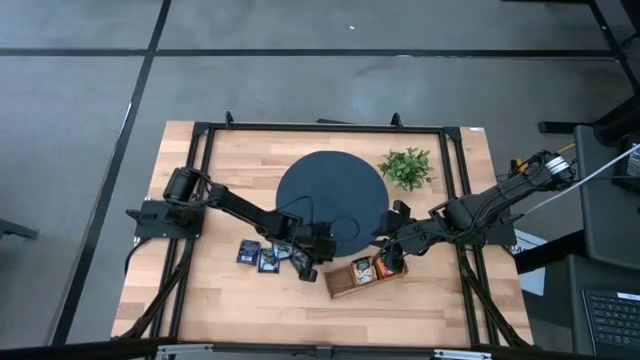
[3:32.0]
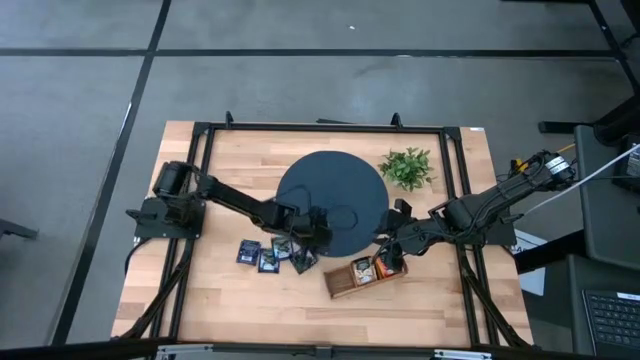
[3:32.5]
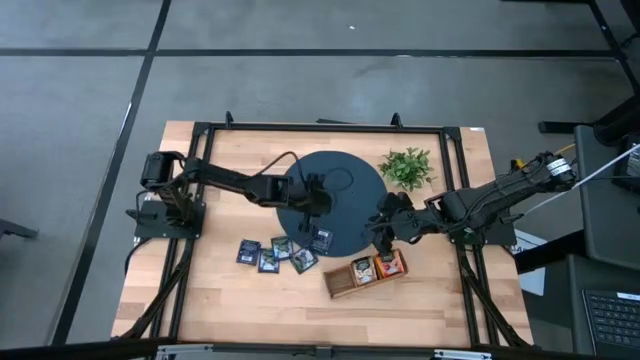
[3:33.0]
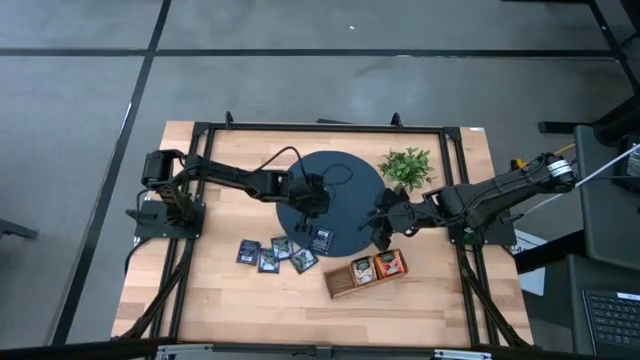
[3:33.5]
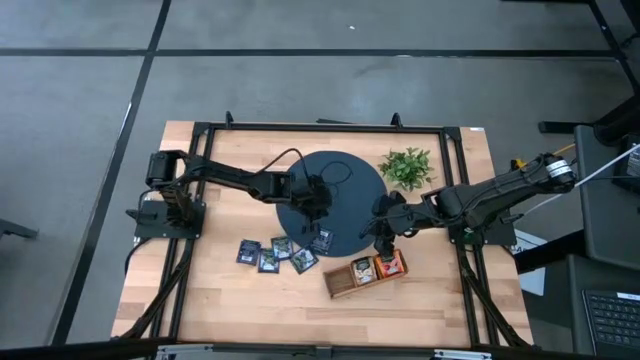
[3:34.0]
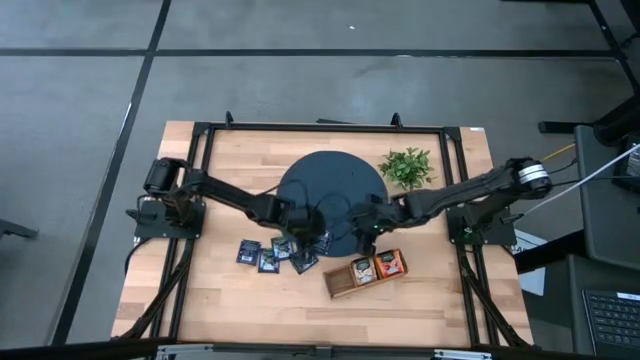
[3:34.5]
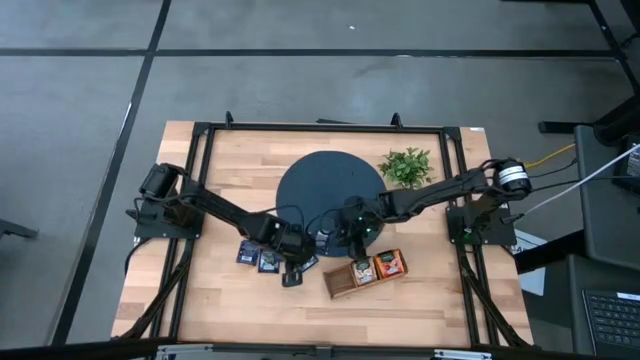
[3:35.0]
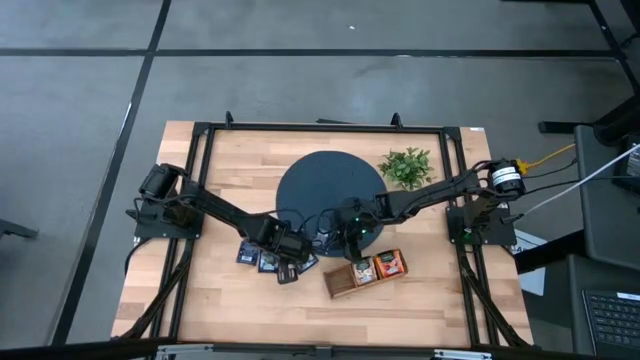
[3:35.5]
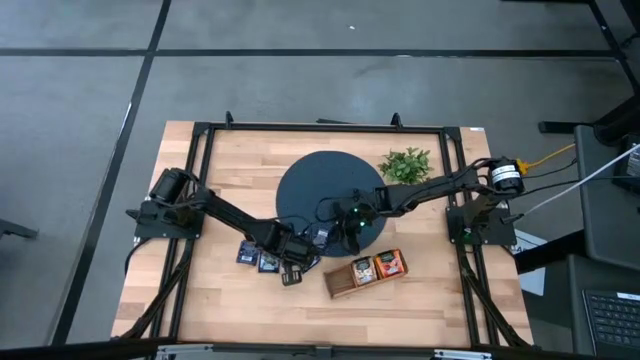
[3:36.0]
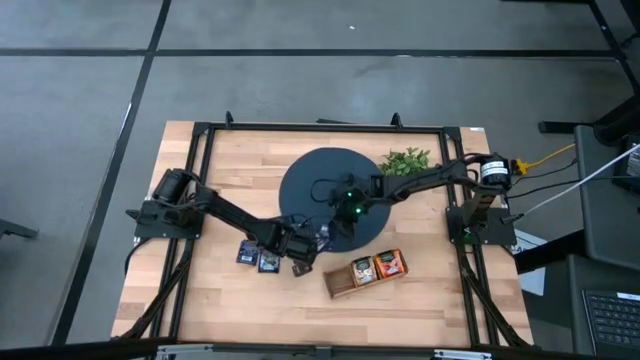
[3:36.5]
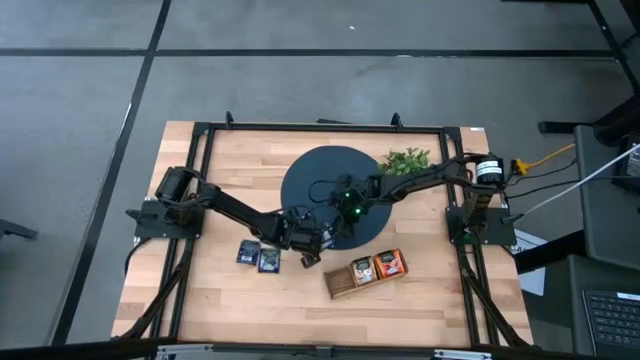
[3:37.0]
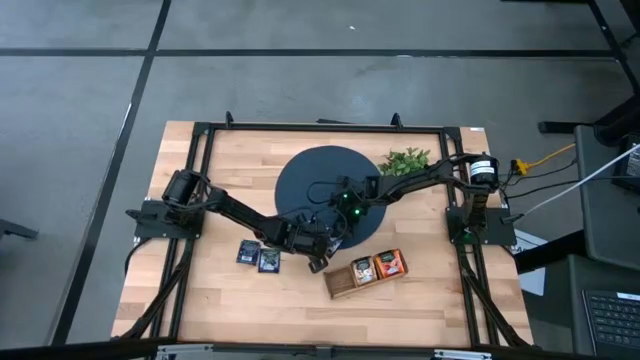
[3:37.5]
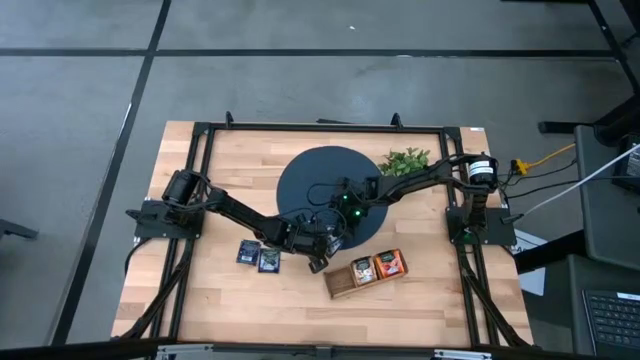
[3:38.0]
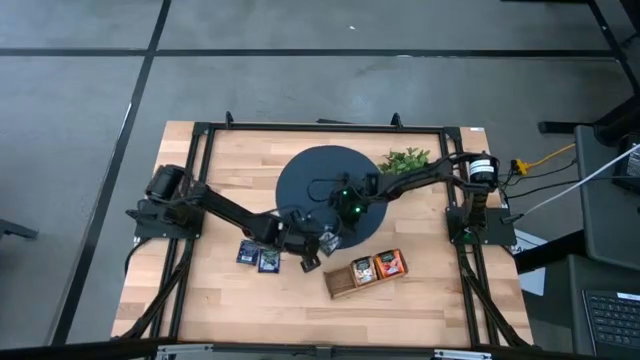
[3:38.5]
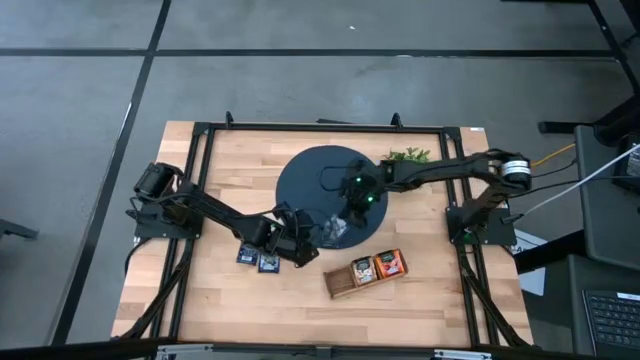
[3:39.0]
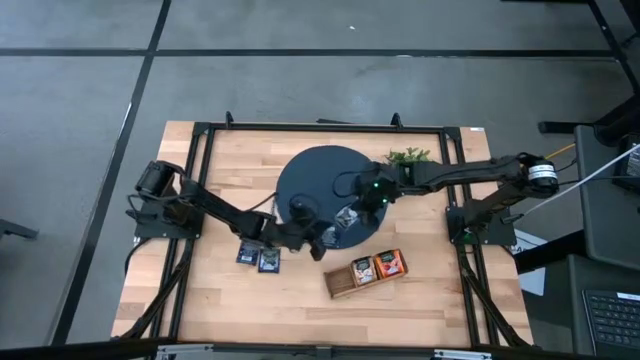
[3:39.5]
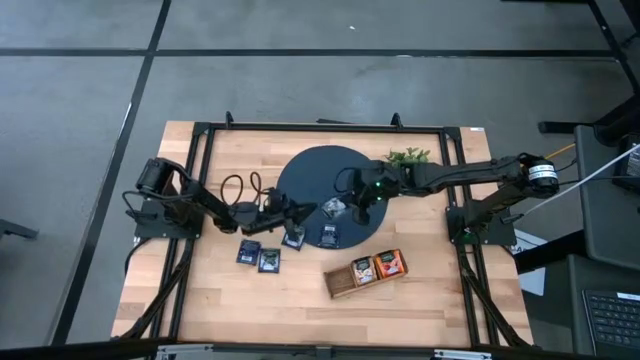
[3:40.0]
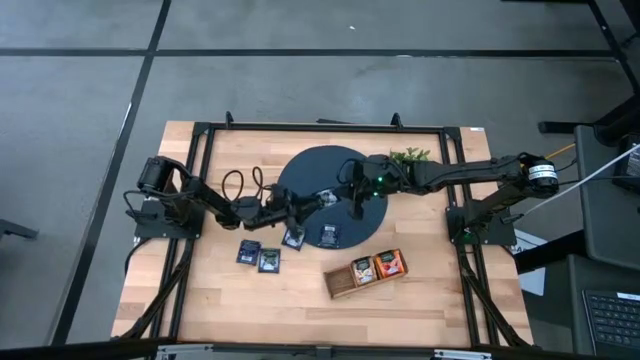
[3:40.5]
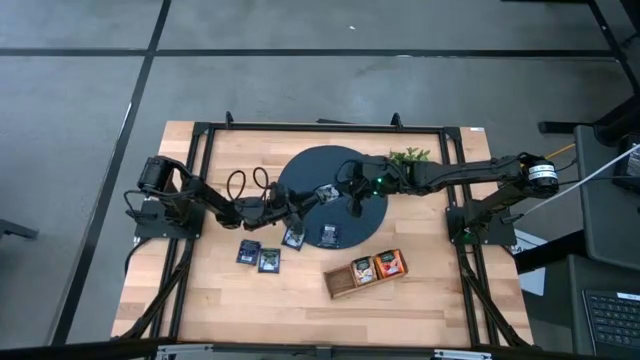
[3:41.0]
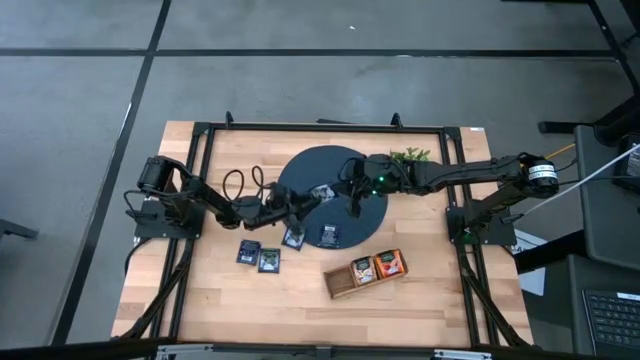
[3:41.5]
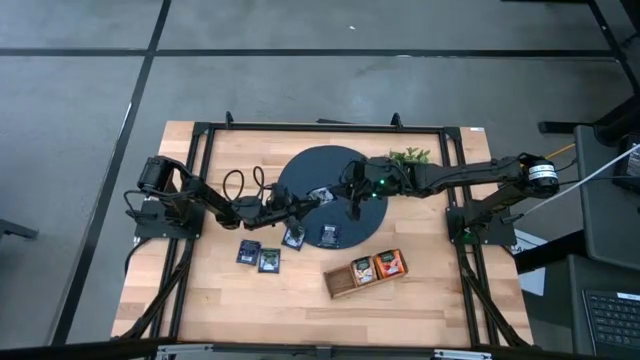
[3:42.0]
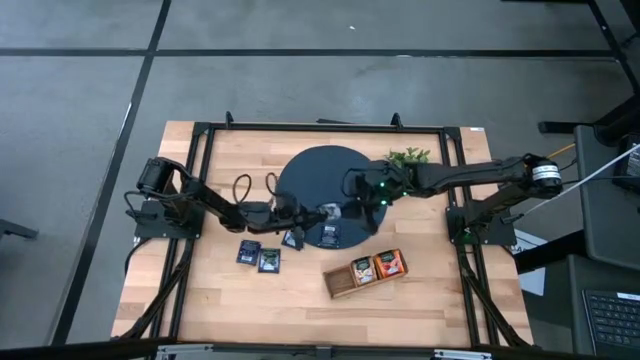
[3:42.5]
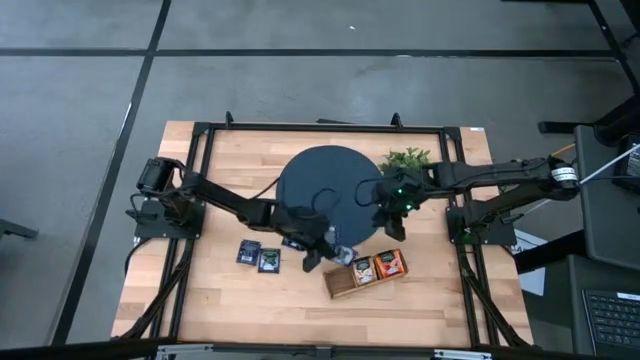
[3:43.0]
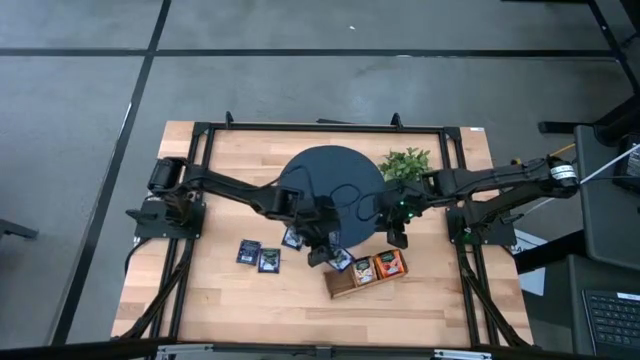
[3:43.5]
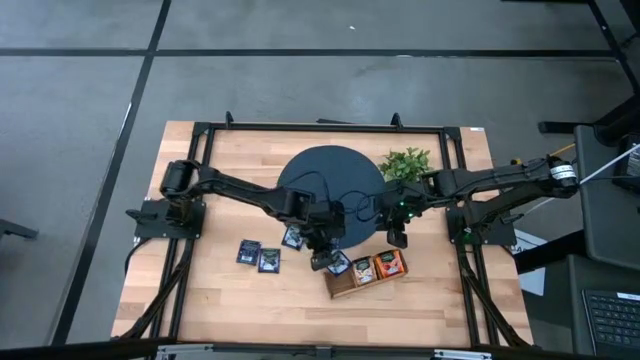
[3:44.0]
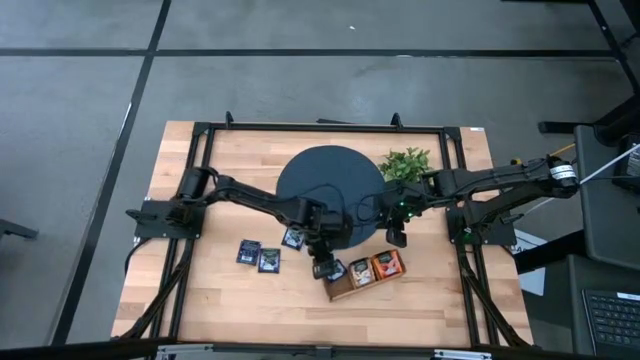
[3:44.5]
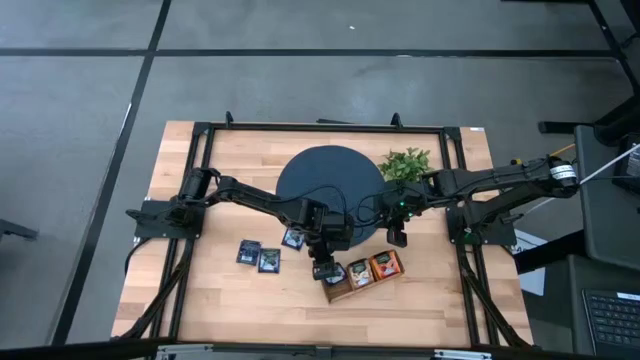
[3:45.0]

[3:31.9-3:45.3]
Task: Pick & Place Tea
Put the purple tea bag into the left section of the wooden organizer

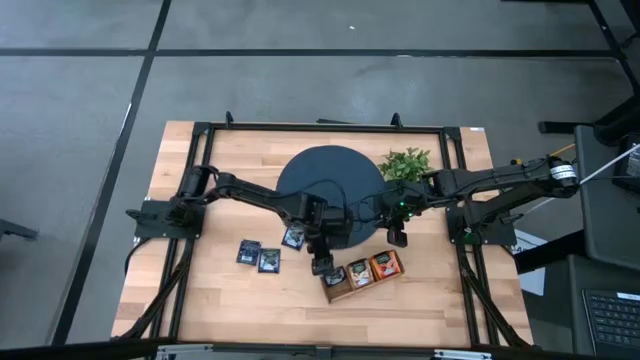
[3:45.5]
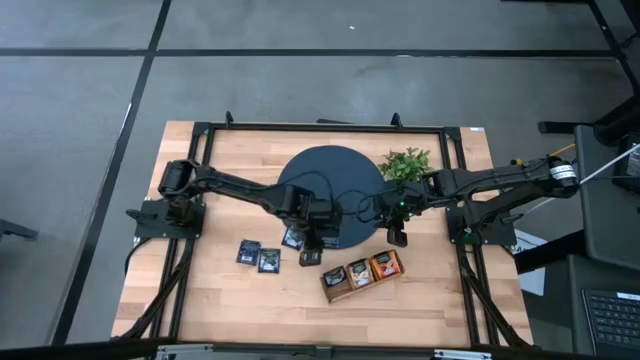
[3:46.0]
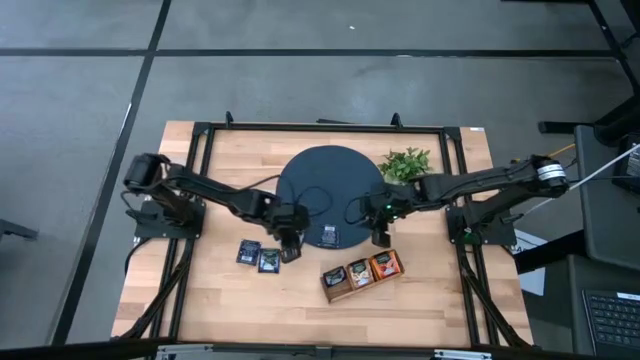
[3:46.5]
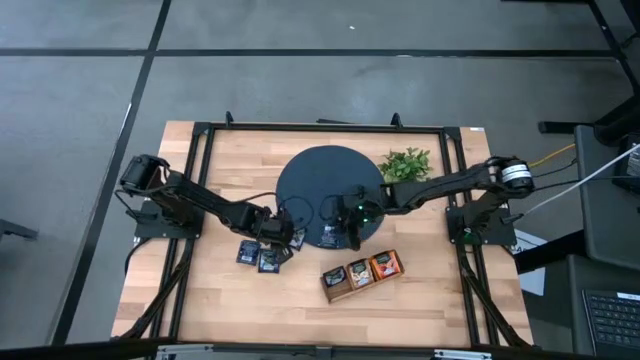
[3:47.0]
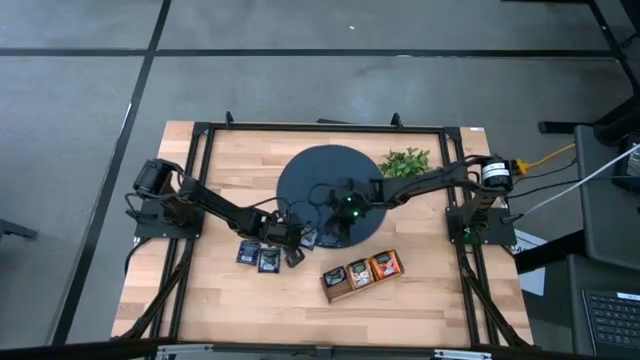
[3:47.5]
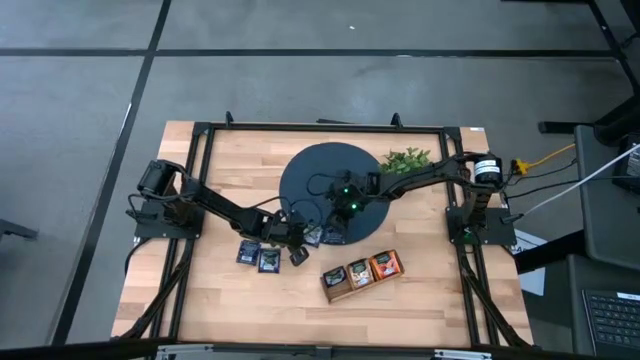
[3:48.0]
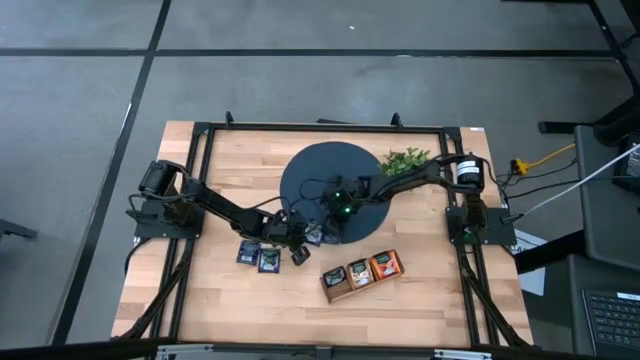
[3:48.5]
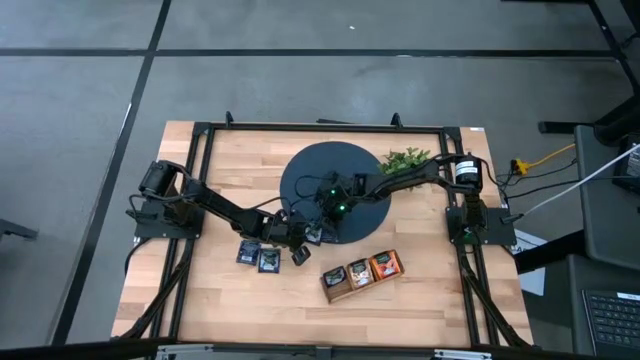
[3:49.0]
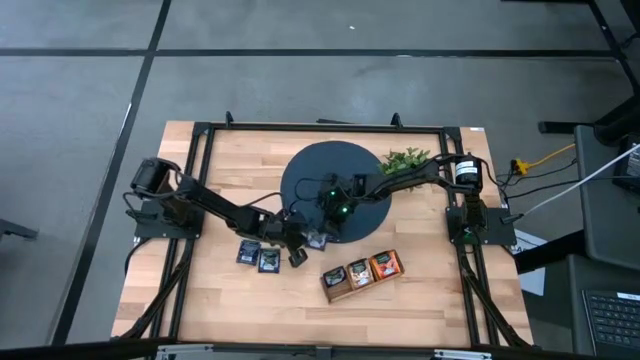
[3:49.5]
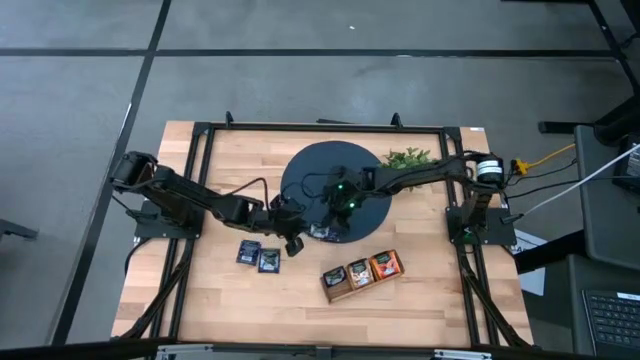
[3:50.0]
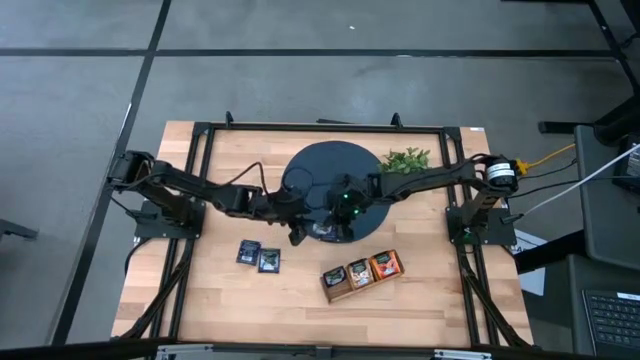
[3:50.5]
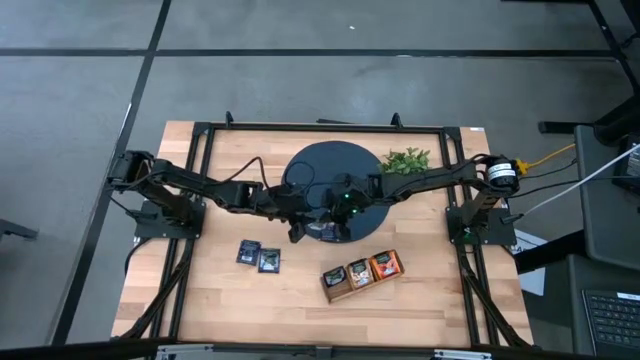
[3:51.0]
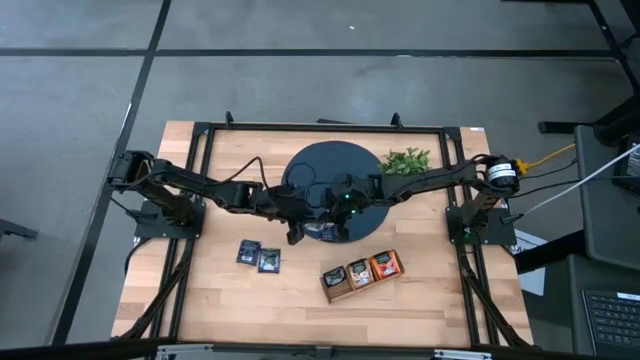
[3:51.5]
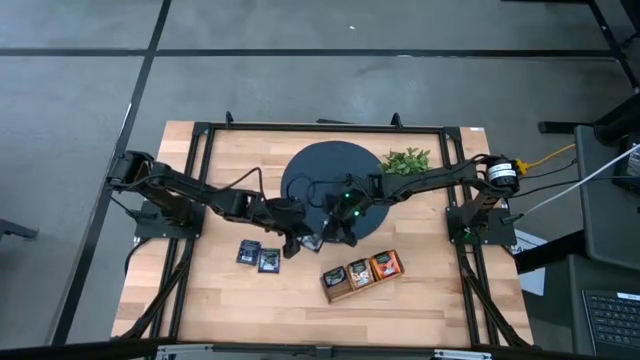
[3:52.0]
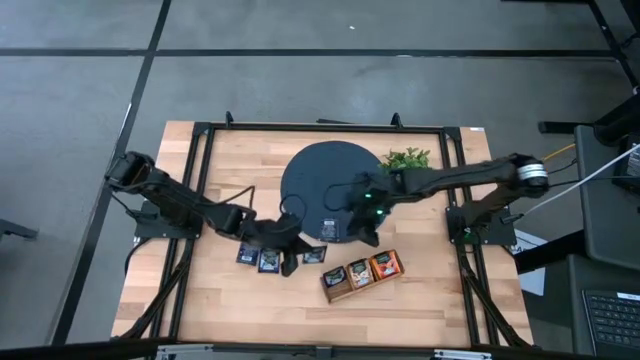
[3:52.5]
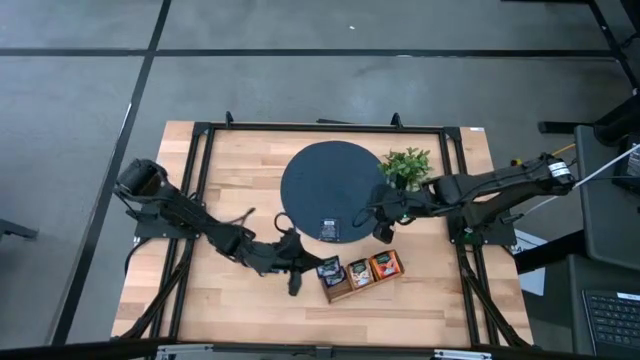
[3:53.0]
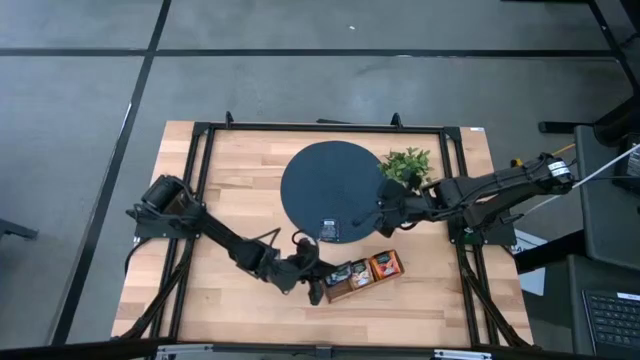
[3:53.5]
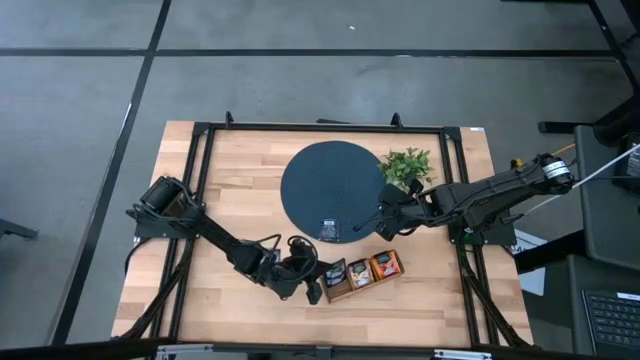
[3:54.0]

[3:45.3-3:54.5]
Put the purple tea bag into the left section of the wooden organizer
